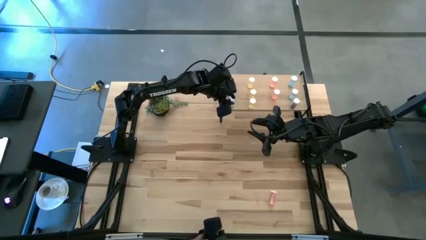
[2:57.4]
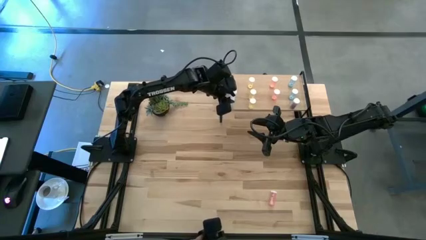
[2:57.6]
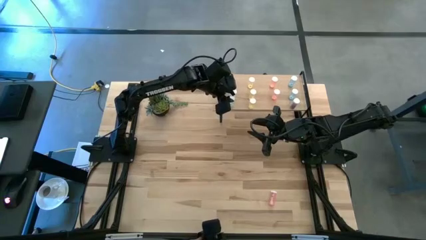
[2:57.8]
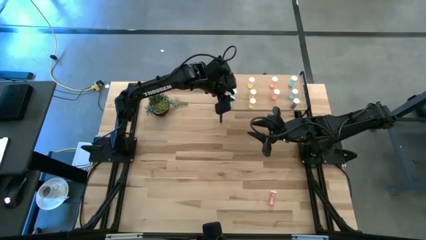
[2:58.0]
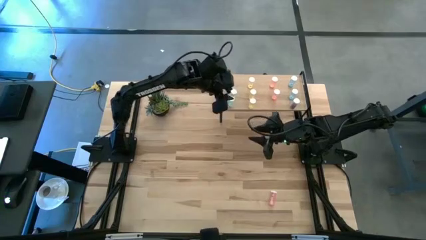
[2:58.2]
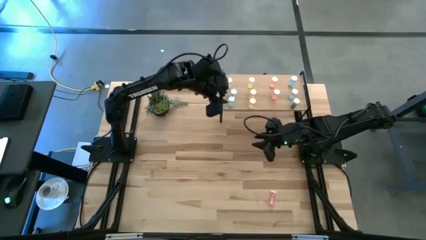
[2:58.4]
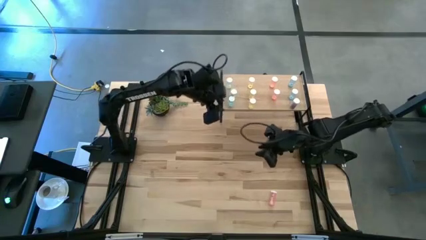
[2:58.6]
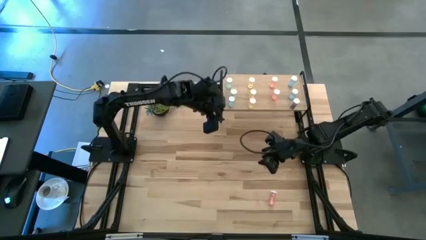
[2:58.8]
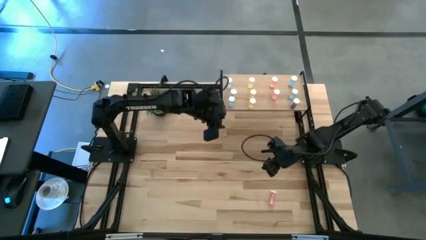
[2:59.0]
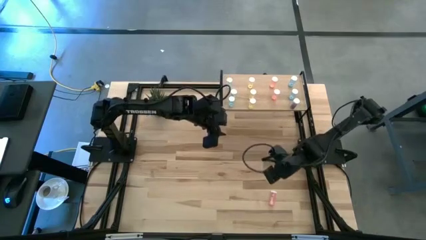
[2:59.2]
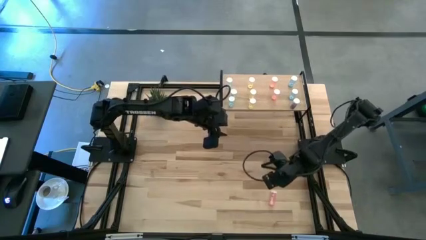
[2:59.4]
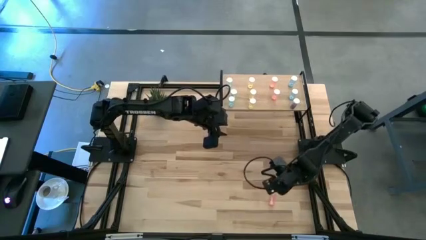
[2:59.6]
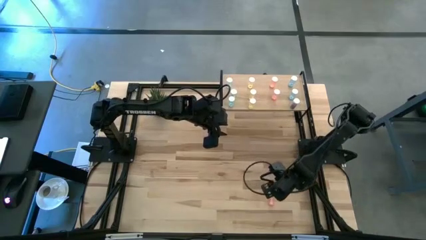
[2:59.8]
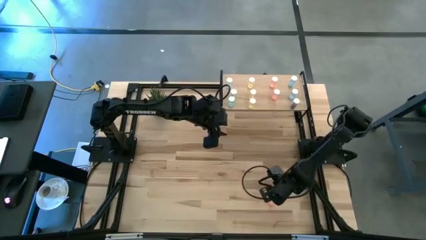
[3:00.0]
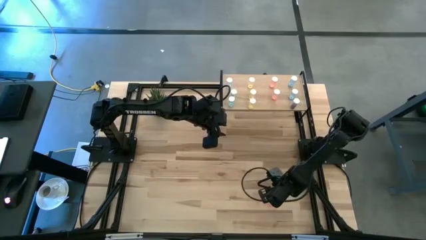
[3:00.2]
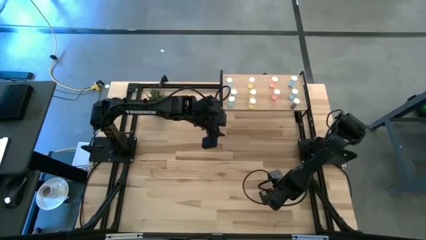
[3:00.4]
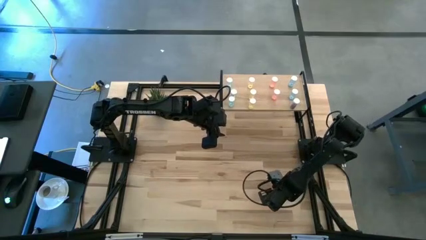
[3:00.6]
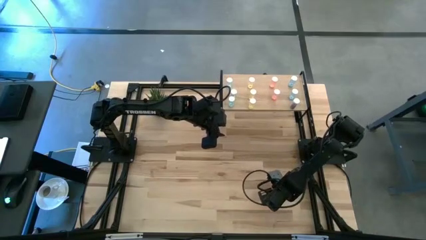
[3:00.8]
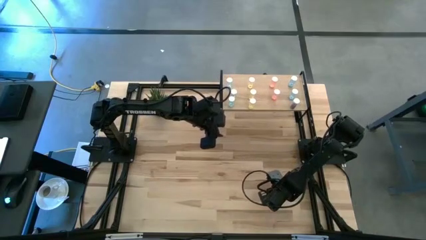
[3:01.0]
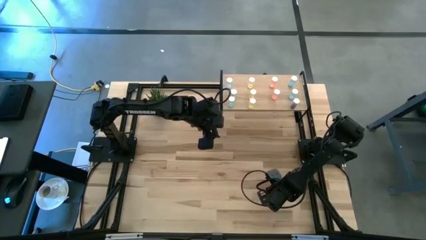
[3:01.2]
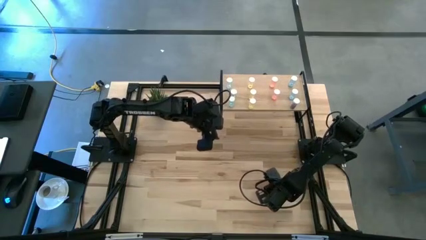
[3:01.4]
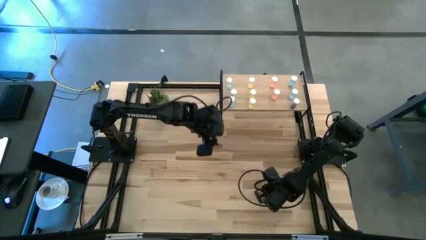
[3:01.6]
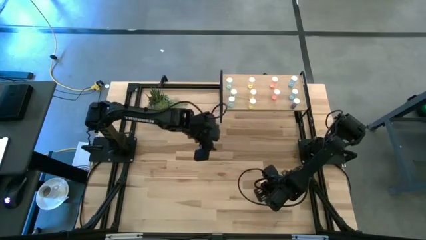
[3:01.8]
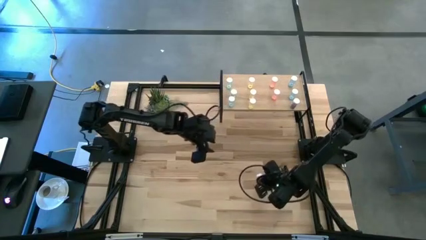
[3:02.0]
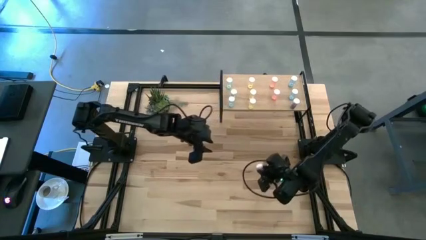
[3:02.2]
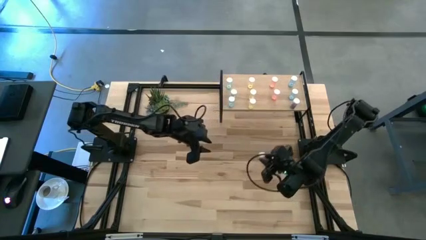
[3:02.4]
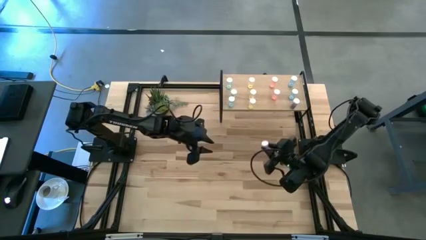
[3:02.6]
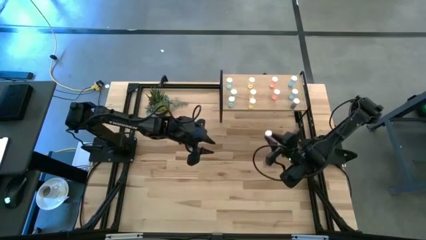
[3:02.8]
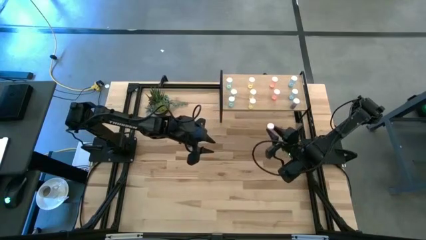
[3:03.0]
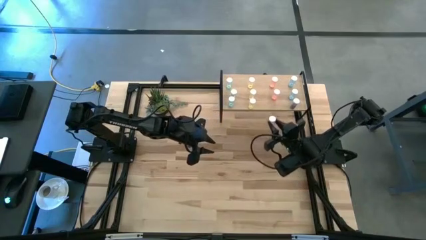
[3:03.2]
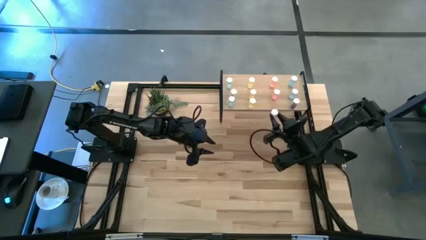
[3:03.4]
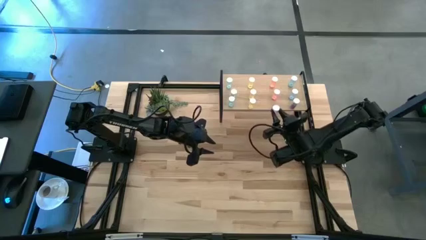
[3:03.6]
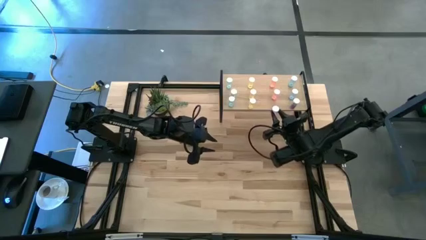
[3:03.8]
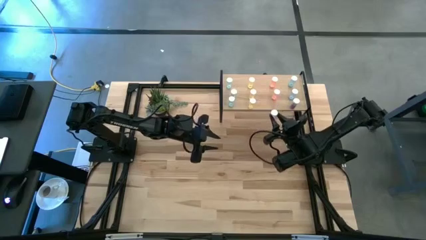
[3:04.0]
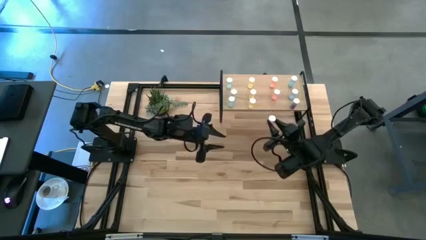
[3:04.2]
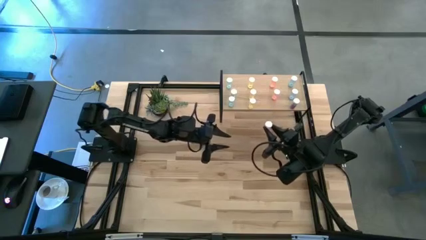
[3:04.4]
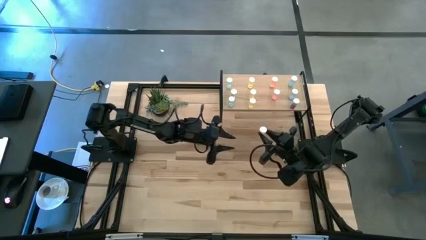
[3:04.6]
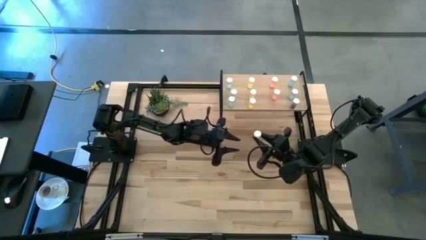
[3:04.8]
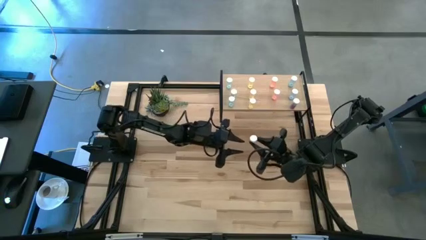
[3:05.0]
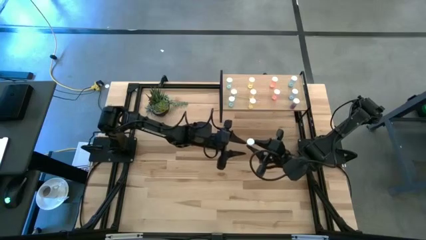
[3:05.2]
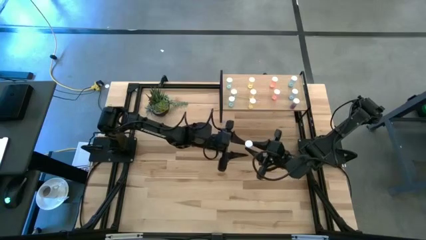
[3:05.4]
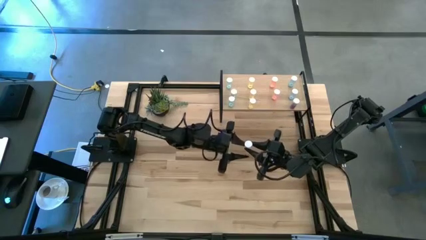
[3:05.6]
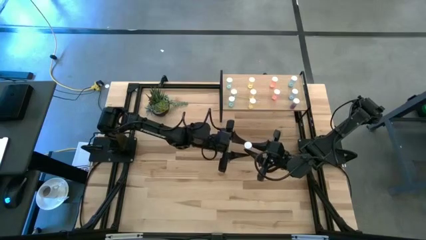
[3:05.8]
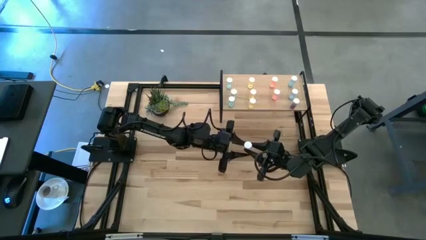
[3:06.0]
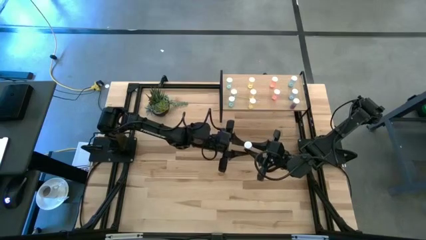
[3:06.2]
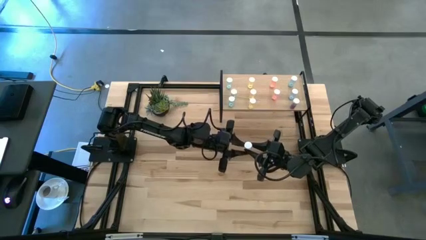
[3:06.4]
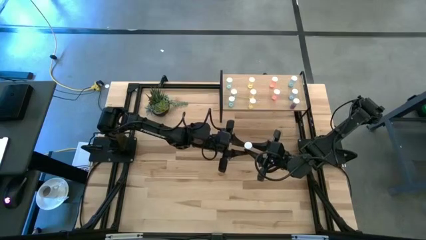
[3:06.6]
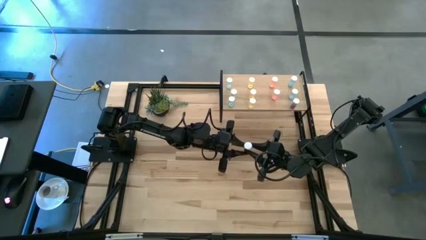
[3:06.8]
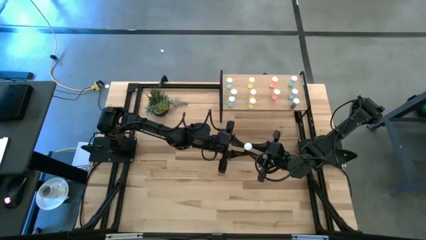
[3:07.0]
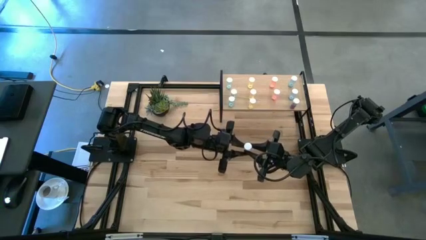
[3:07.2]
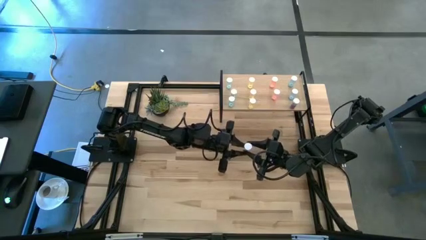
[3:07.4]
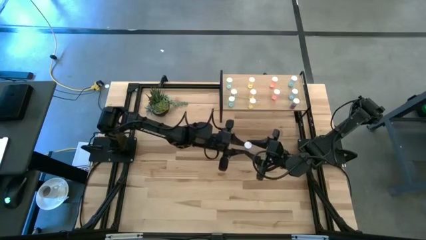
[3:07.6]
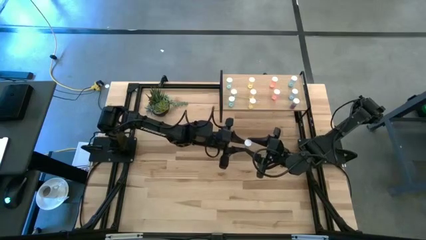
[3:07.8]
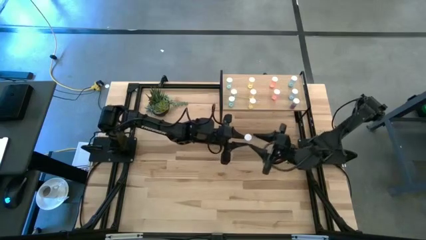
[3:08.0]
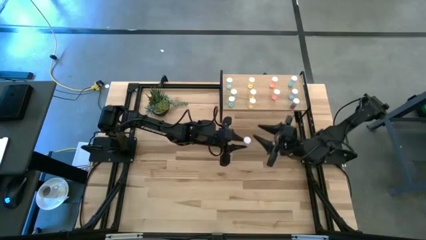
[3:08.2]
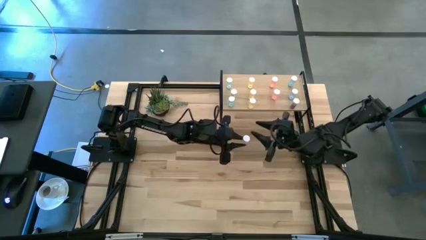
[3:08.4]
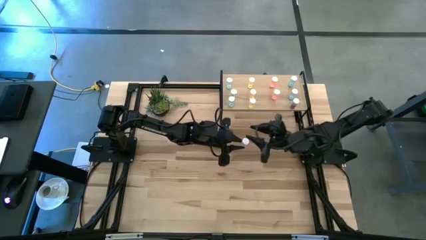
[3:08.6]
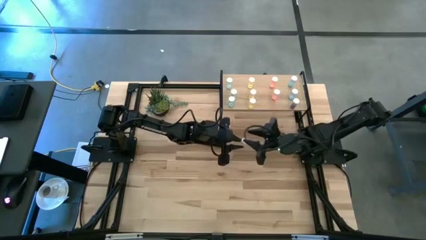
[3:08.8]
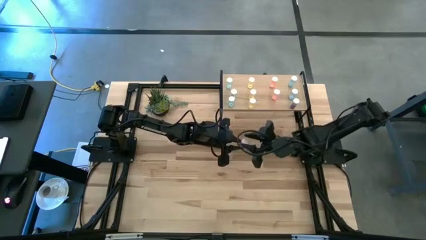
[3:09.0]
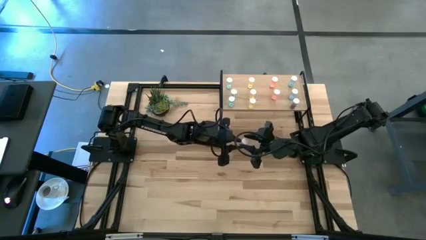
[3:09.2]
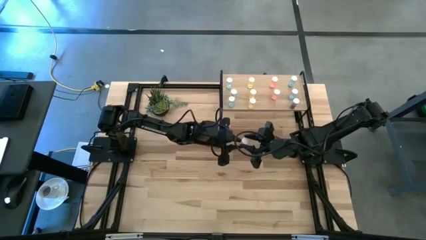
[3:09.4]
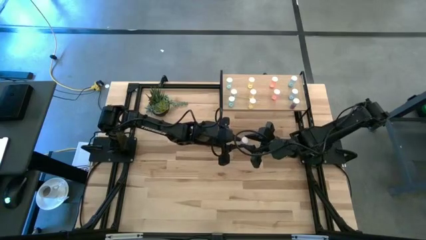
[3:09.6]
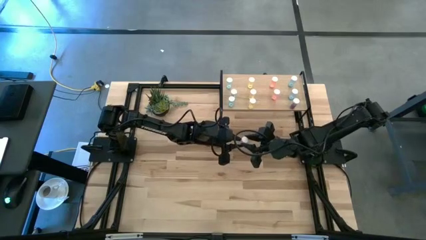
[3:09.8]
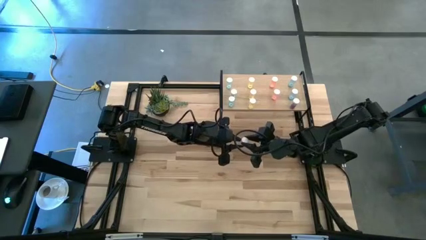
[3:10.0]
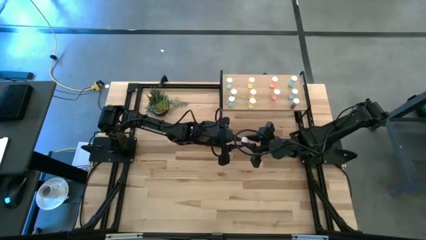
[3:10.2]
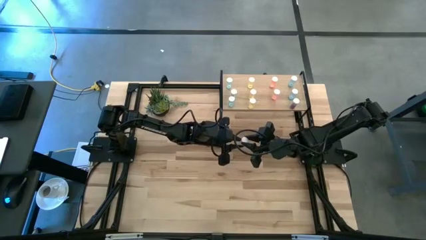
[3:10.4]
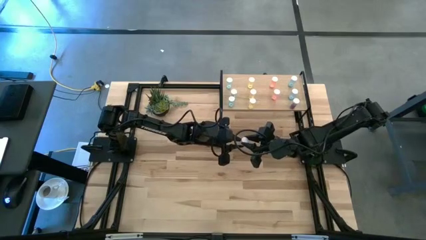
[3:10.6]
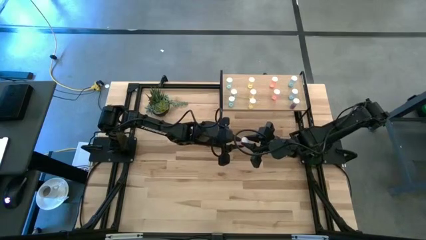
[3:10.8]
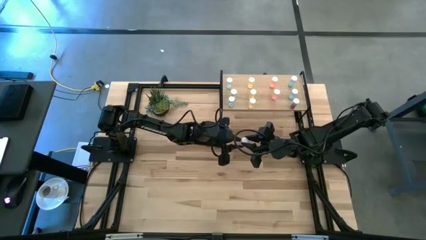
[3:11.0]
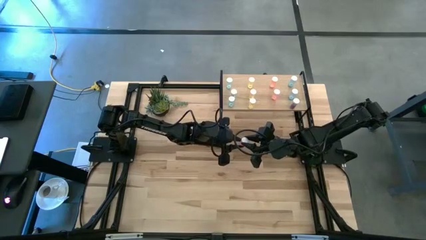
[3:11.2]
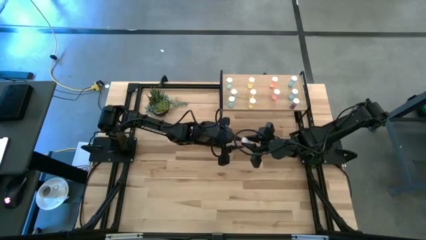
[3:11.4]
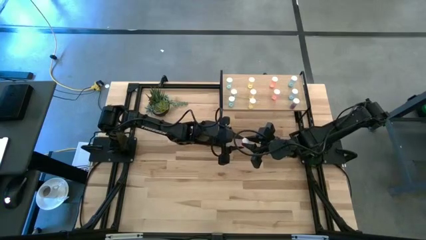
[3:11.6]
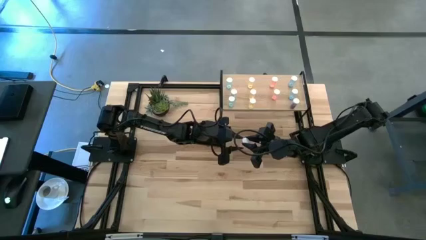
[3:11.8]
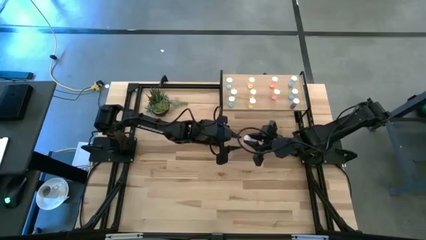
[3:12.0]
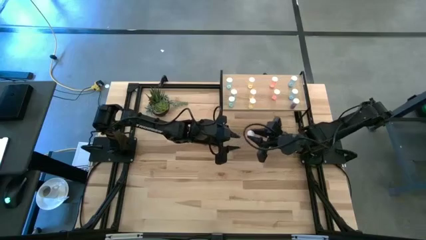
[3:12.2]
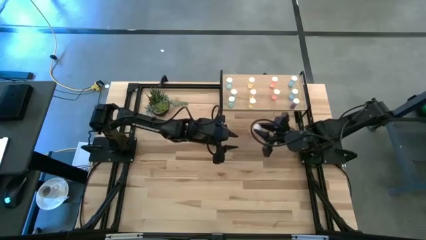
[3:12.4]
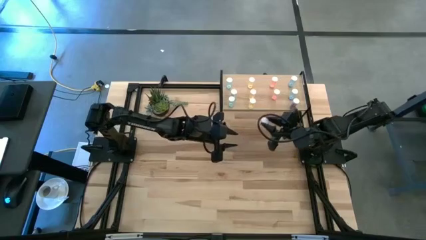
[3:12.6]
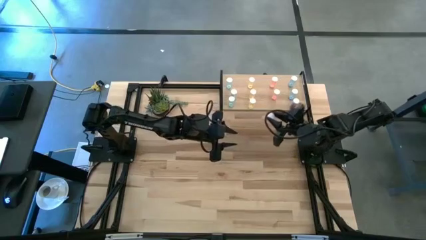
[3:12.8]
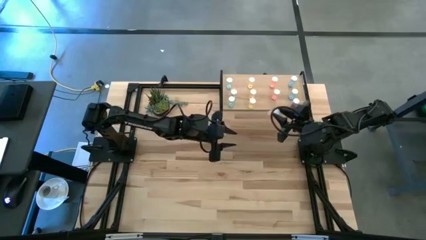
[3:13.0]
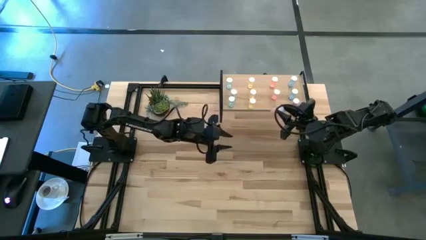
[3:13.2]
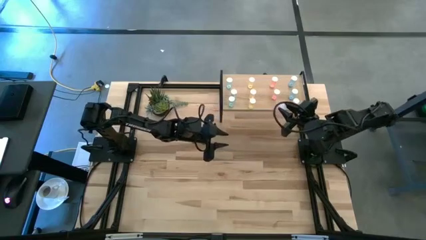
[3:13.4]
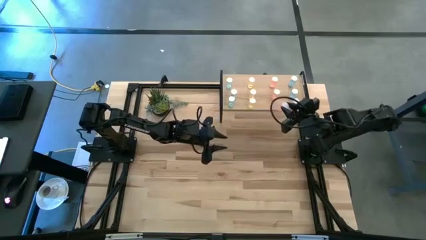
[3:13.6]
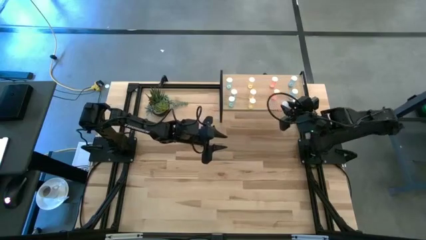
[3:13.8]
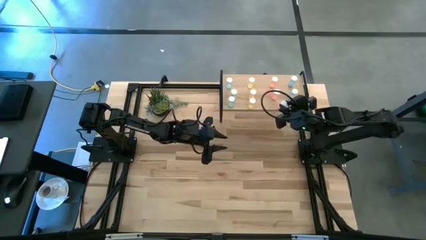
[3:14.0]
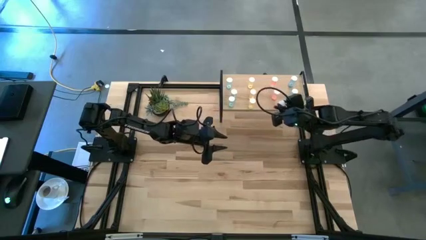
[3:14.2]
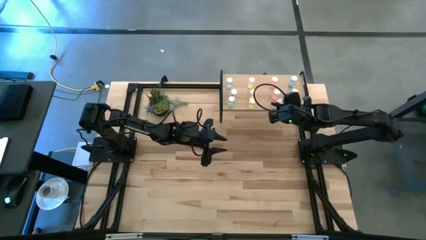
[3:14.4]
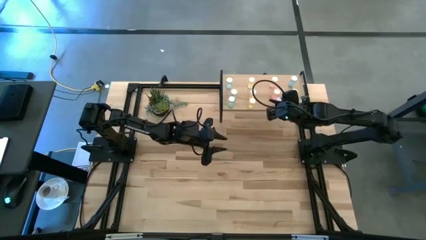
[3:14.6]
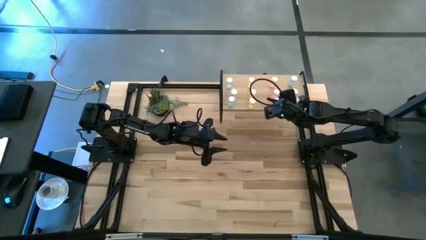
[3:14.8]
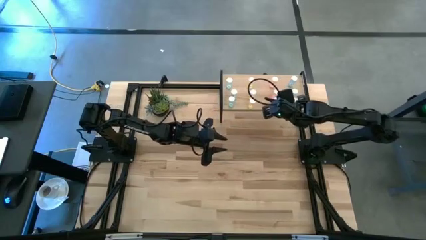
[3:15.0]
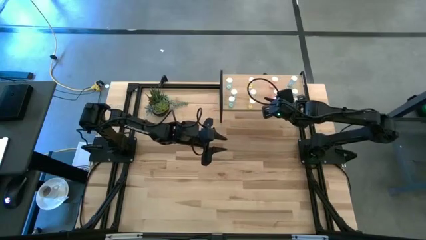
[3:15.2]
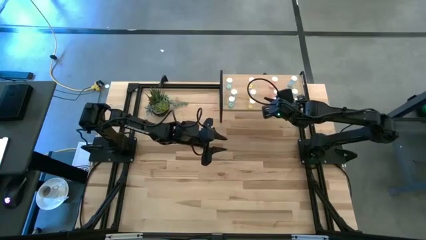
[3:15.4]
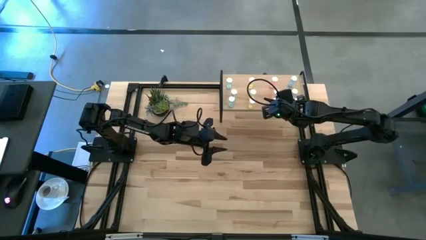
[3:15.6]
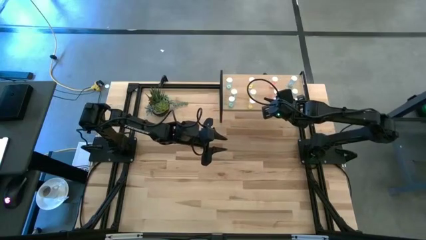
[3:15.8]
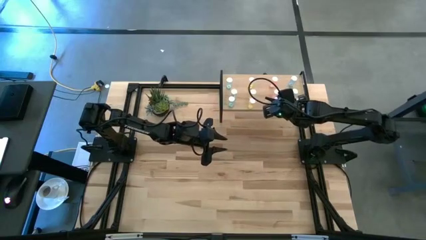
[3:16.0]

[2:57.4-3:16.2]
Task: Pick and place medicine bottles onto shelf by color
Put the pink pill bottle aligned with the other pink pill bottles on the shelf
